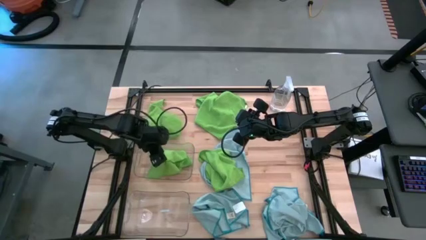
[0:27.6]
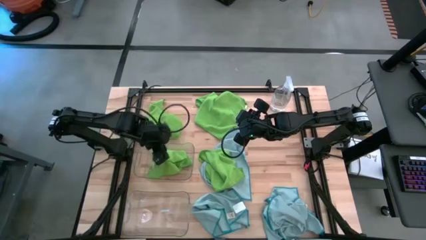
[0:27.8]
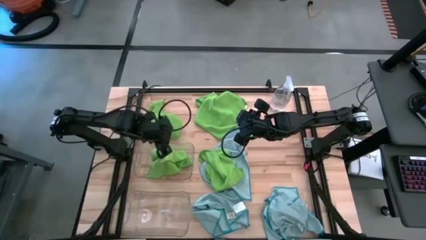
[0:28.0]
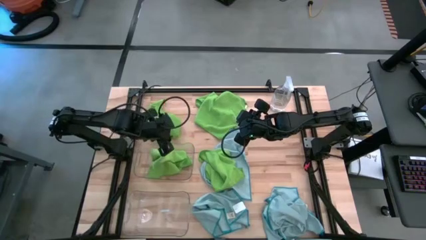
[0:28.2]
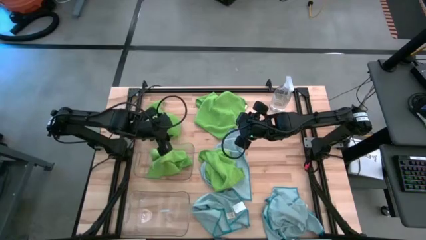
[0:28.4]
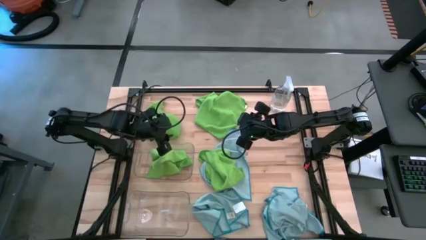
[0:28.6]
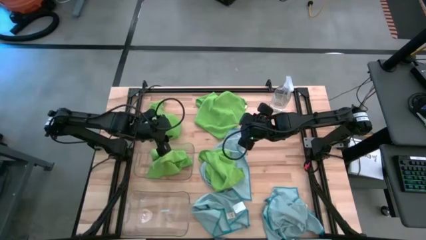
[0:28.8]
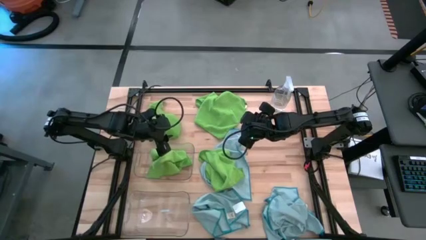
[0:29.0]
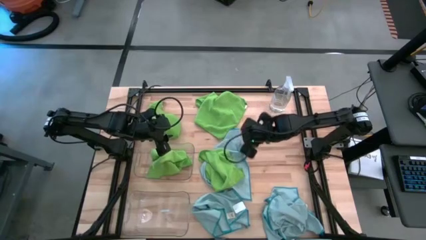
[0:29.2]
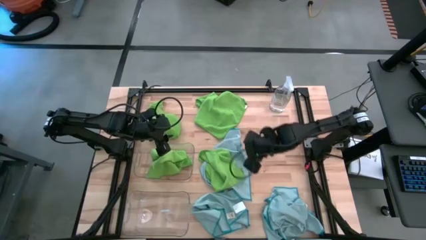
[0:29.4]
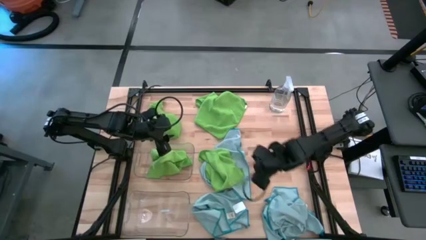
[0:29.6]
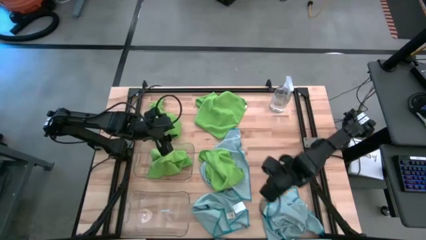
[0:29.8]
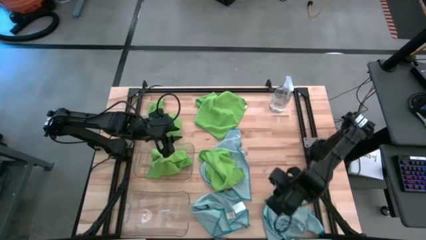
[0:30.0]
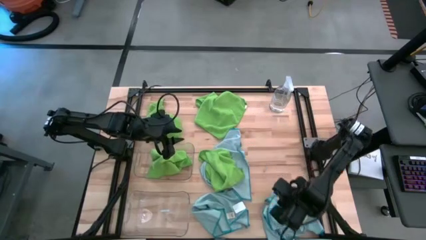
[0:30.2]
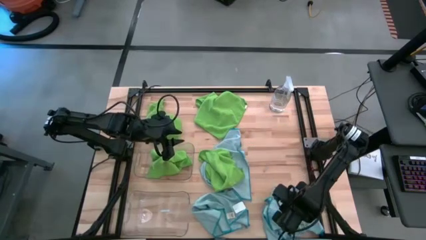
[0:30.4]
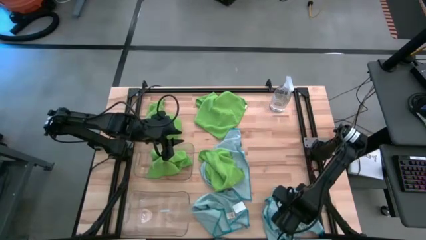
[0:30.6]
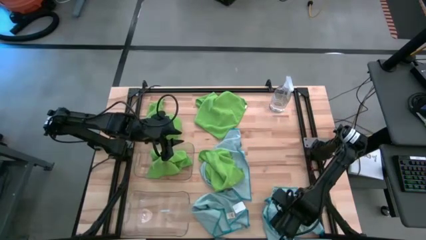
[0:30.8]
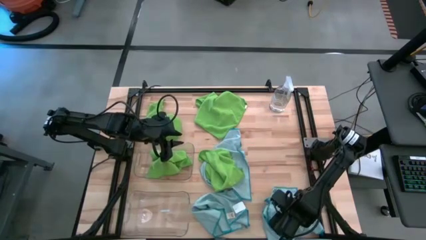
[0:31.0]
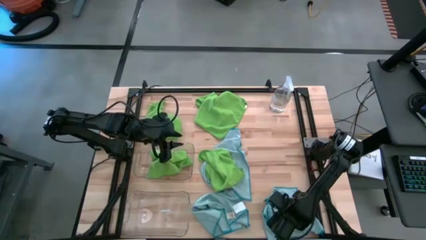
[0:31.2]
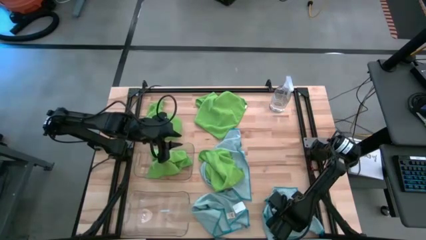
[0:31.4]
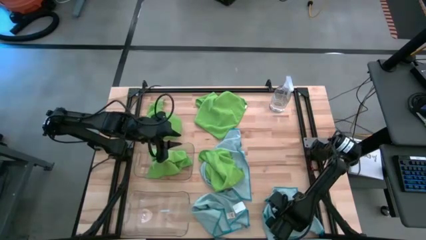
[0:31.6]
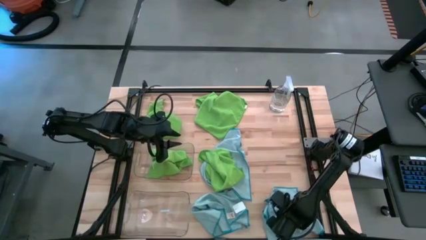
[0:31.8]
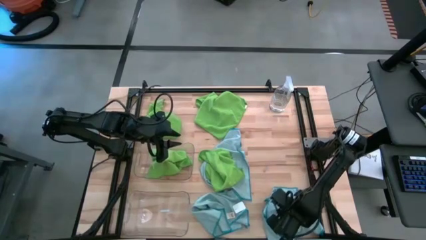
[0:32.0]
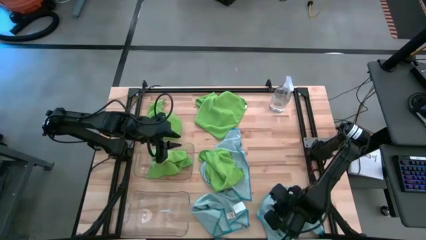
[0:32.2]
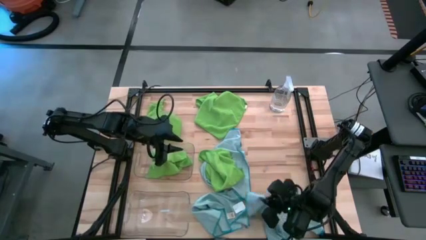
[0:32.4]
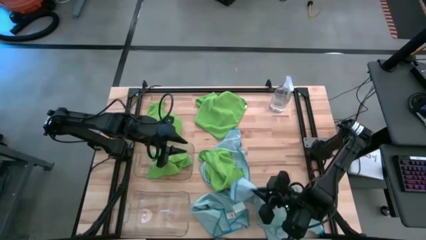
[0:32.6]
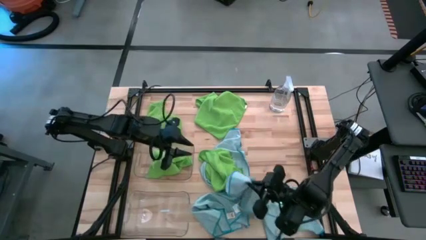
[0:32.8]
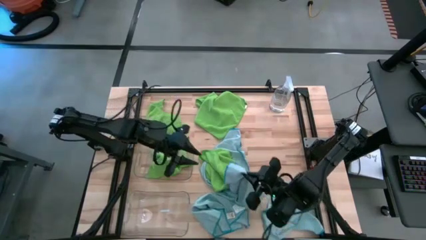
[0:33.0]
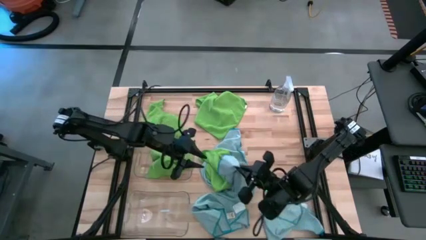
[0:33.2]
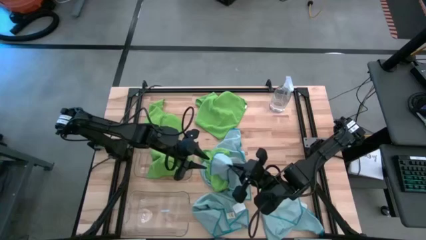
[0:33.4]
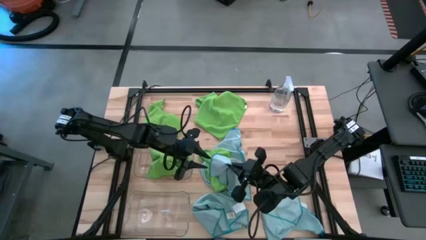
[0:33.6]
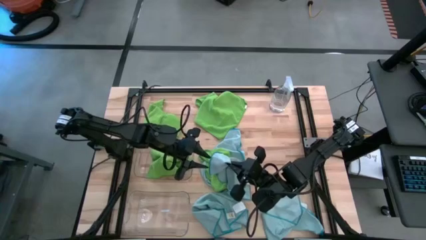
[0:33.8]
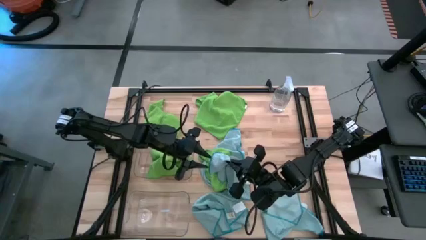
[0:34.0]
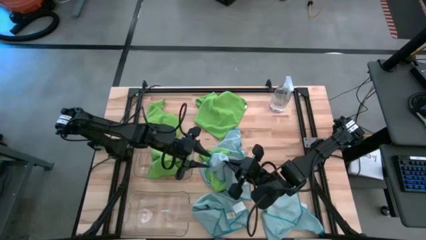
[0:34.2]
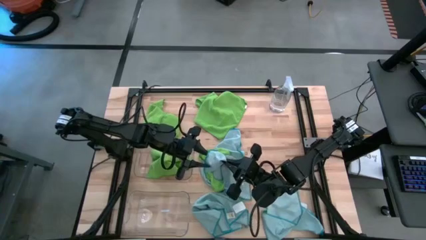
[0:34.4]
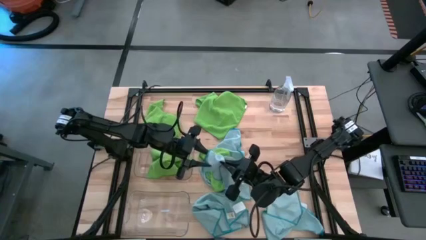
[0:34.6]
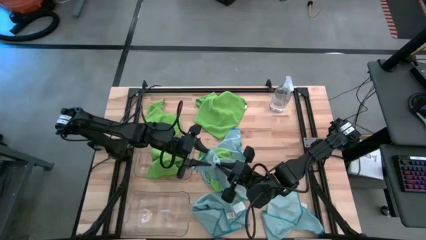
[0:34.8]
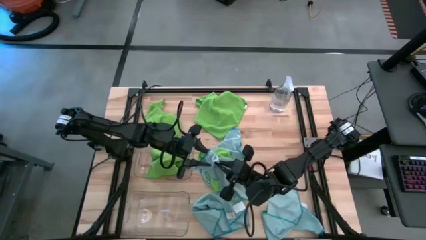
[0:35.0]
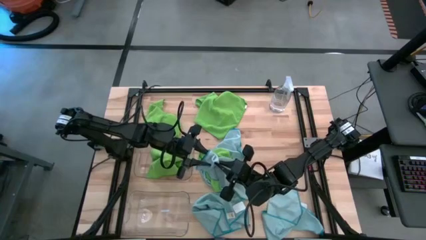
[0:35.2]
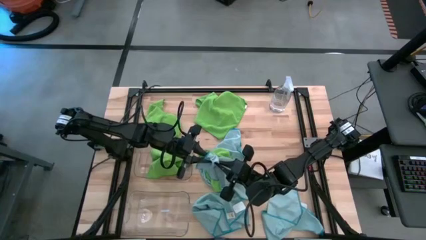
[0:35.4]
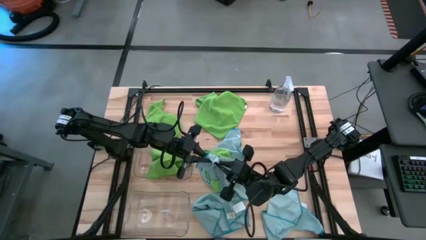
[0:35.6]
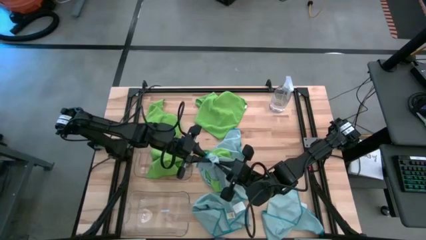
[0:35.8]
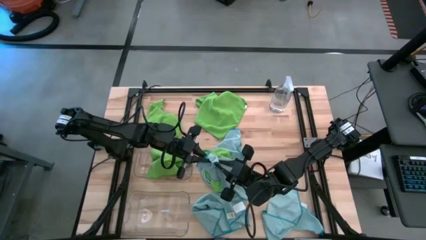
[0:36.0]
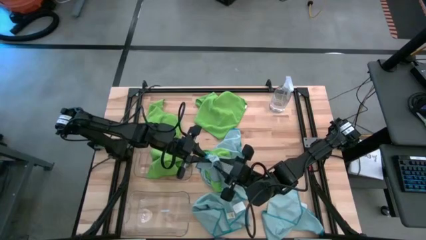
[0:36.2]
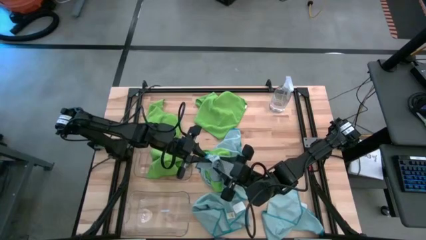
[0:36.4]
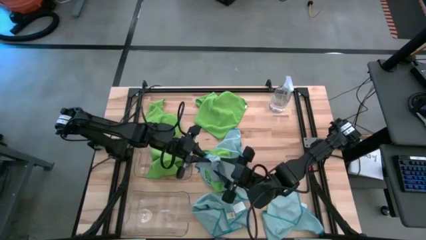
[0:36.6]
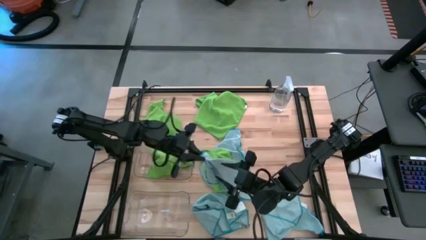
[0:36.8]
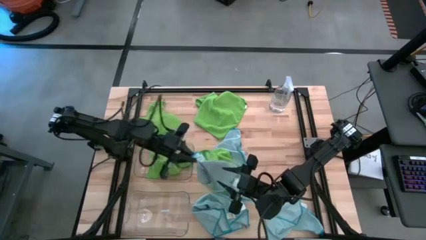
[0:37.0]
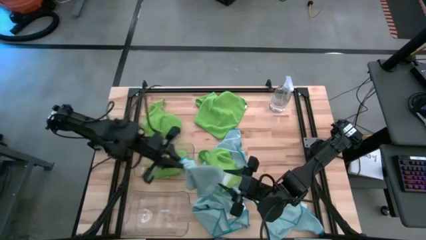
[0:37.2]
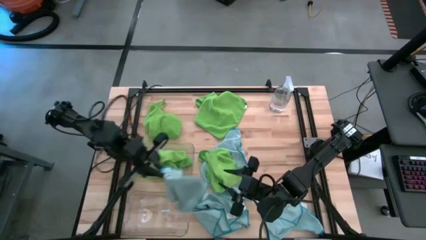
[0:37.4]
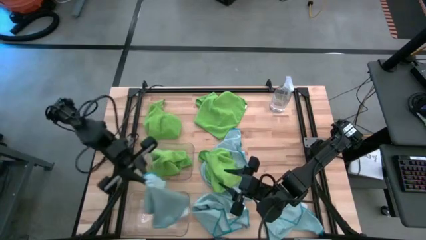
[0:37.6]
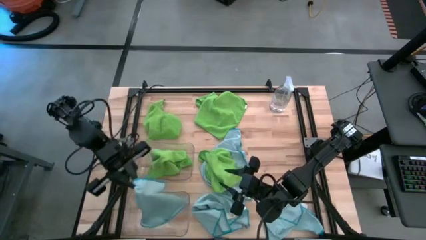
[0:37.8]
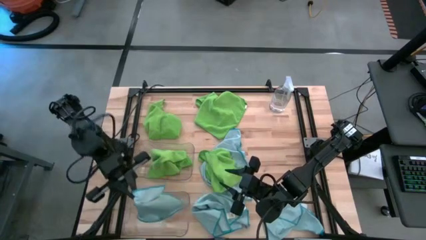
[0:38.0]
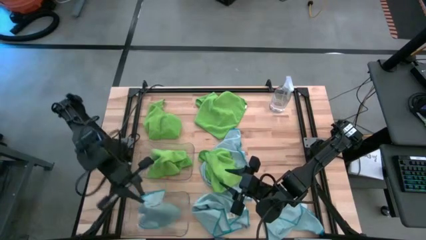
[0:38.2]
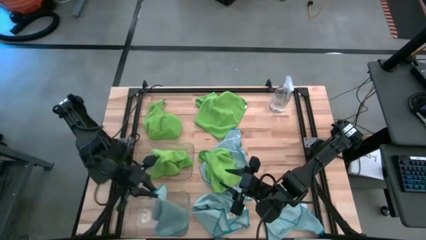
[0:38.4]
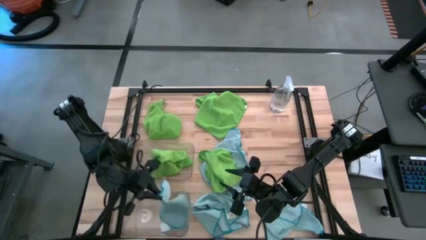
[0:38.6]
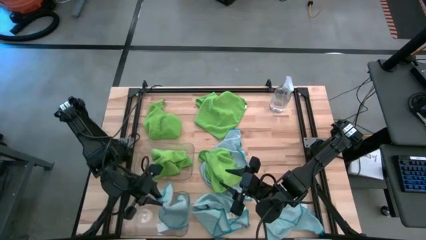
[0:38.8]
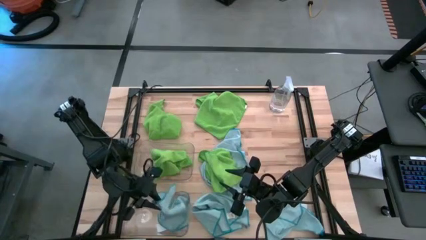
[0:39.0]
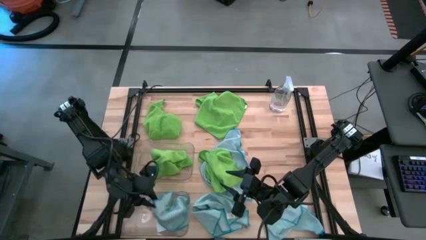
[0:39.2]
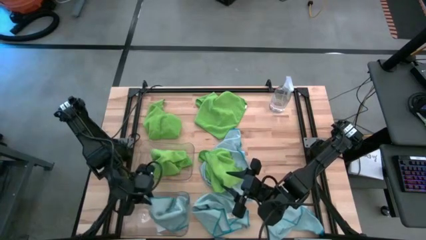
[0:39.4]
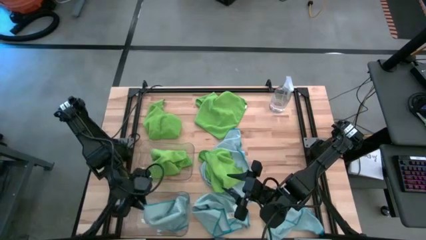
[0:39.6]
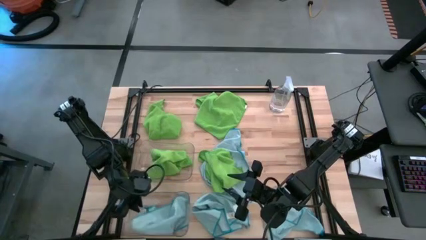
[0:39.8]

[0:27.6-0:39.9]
Task: Sort microfiber towel by color & place in baskets
Put the right blue microfiber cloth into the bottom transparent bin

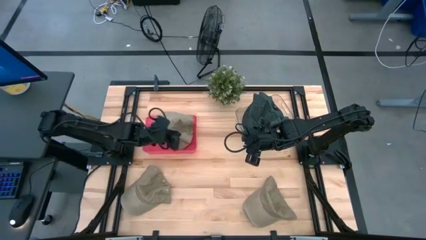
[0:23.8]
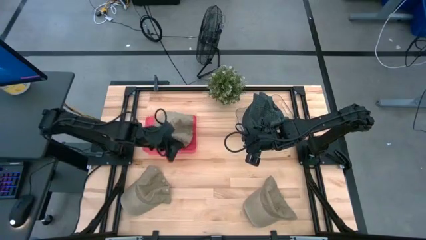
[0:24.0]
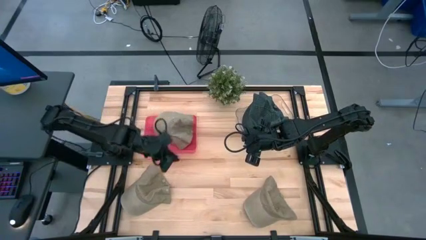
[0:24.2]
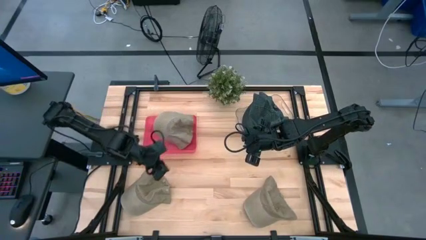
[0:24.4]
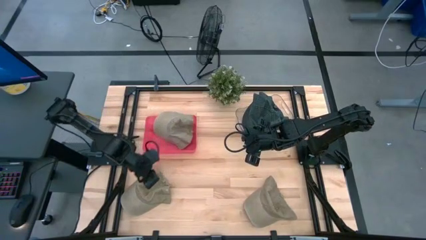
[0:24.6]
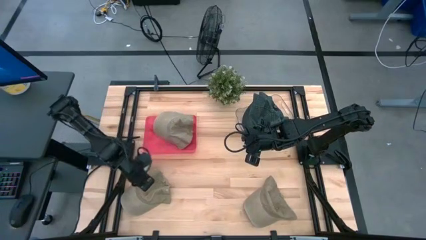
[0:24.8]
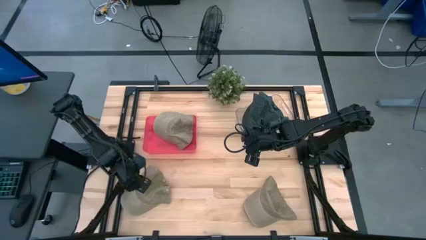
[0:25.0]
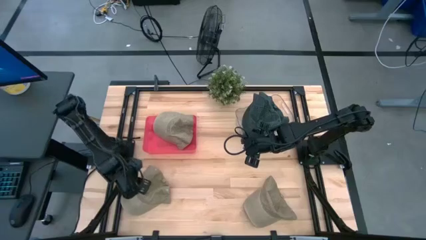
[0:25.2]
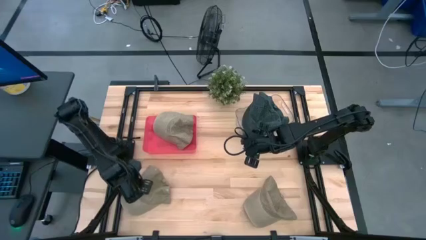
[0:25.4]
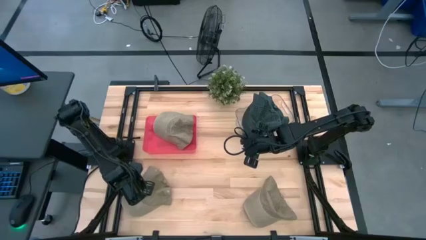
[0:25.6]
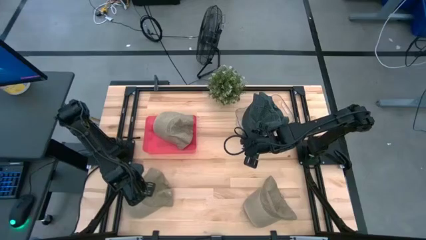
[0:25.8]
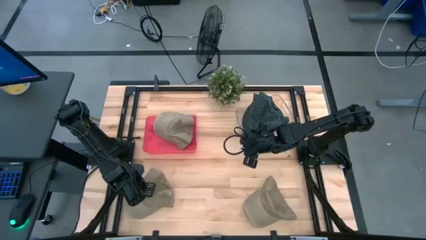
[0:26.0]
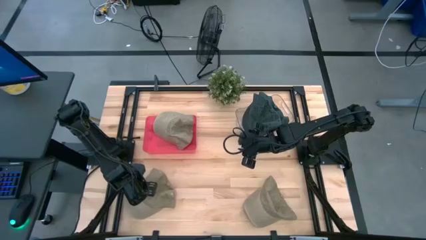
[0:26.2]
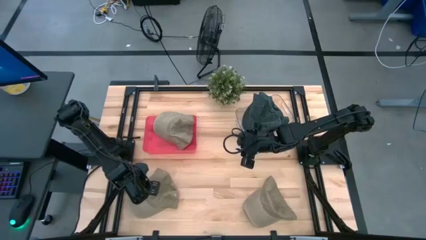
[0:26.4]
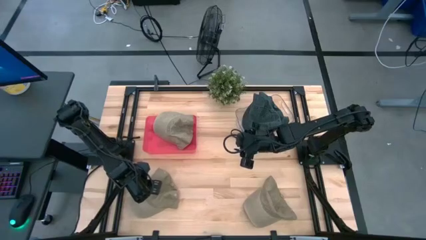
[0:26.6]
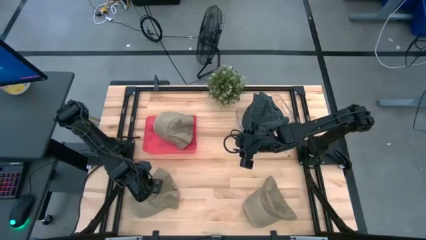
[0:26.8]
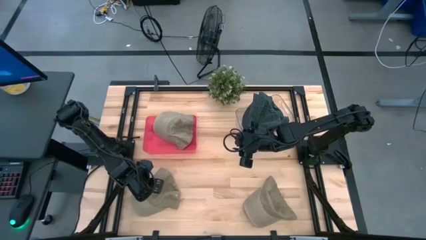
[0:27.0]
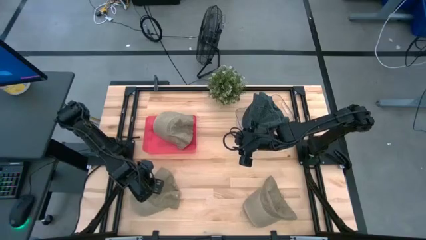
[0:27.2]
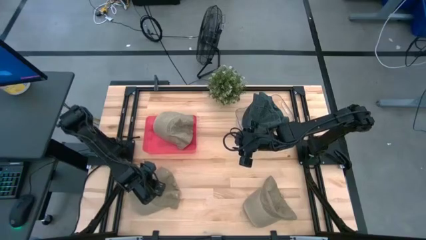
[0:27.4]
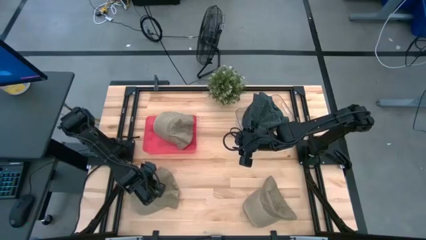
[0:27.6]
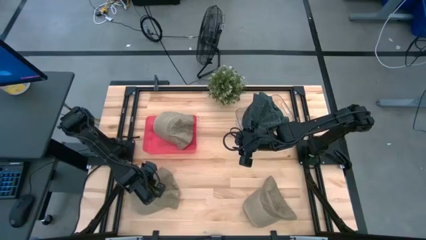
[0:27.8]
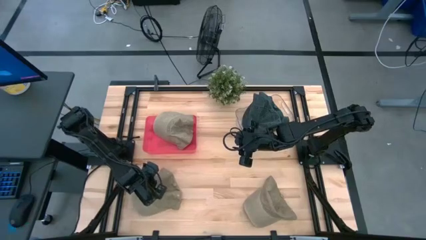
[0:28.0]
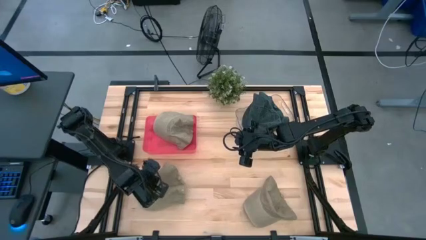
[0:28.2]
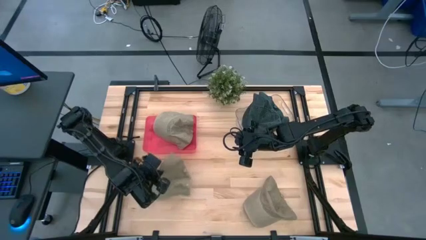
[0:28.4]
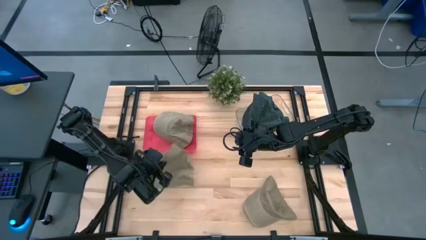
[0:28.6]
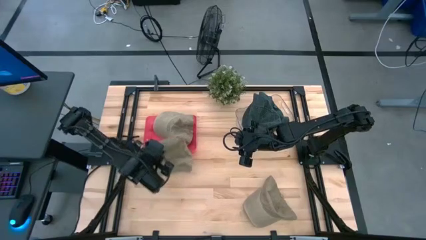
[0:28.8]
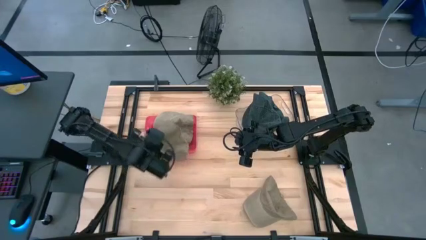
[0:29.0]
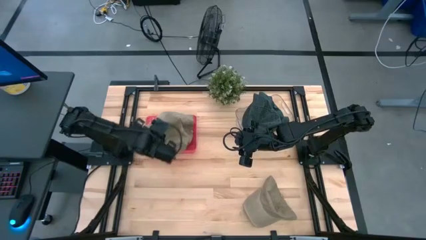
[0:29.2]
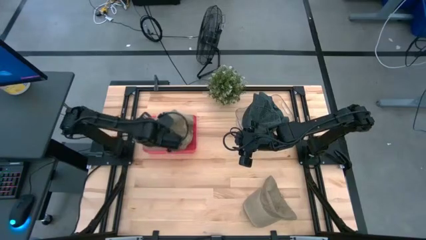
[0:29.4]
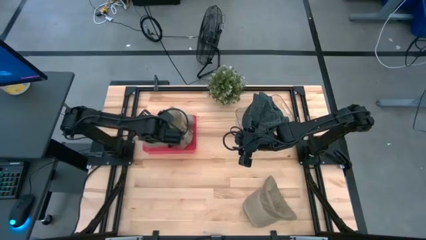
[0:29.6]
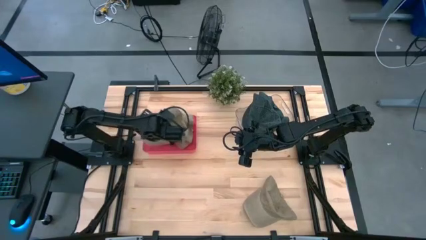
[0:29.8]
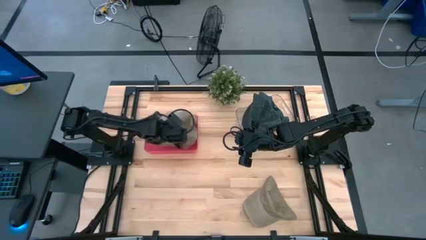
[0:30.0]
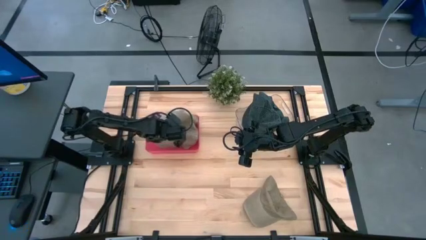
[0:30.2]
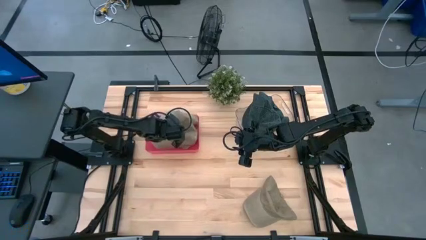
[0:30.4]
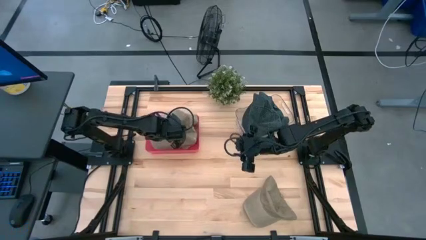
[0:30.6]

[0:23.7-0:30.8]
Task: Pick & Place hat
Put the left brown cap into the red bin
